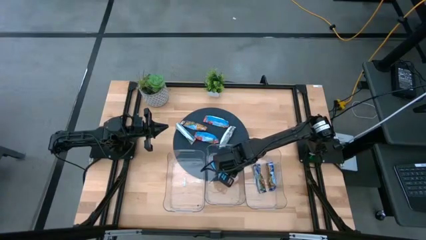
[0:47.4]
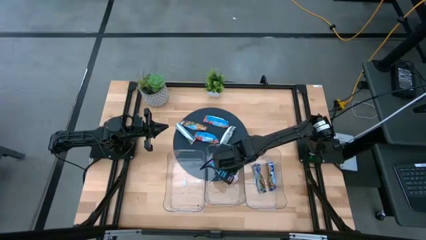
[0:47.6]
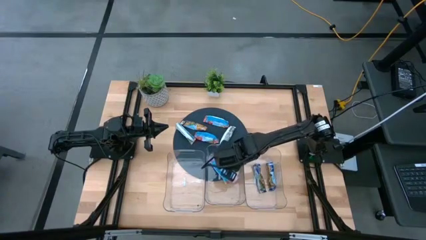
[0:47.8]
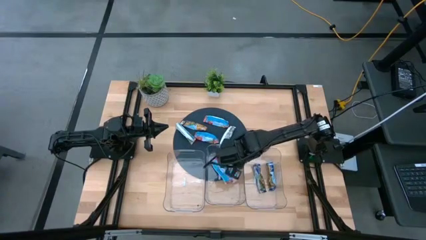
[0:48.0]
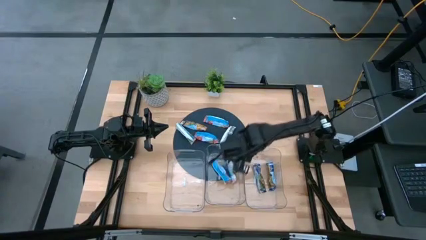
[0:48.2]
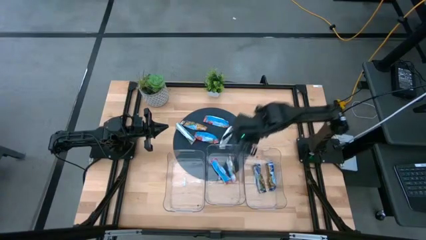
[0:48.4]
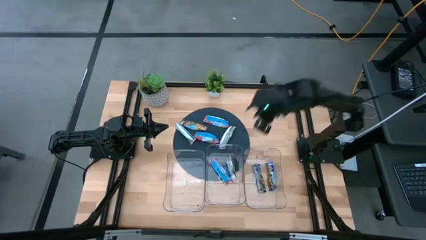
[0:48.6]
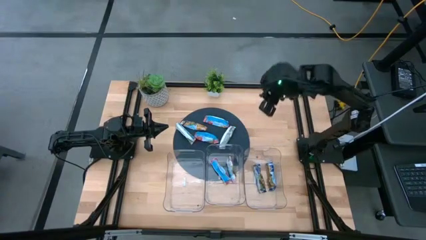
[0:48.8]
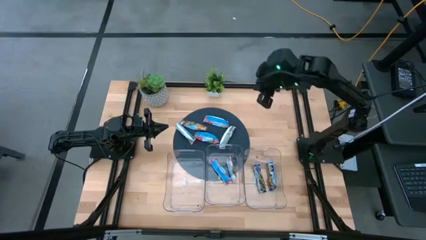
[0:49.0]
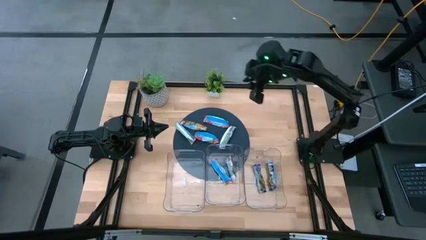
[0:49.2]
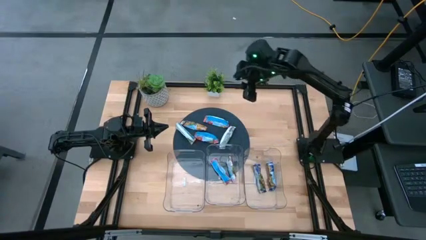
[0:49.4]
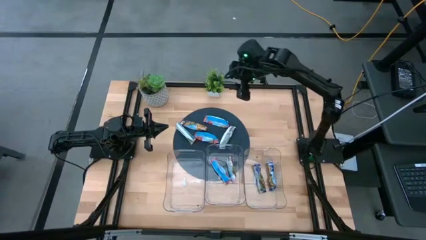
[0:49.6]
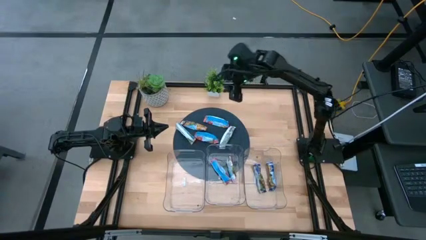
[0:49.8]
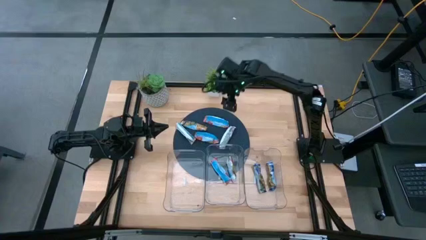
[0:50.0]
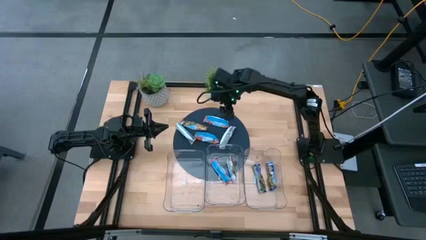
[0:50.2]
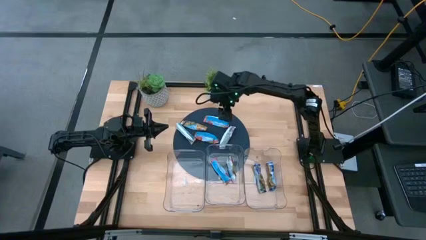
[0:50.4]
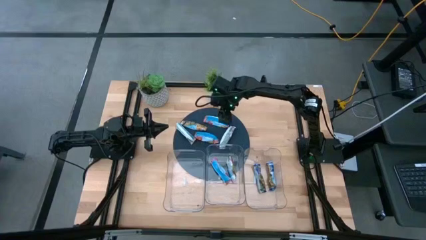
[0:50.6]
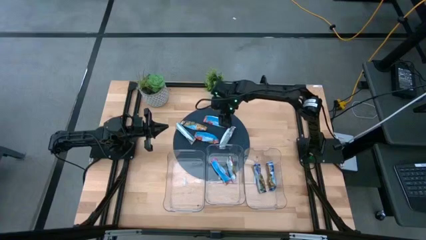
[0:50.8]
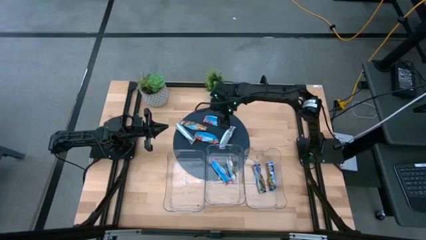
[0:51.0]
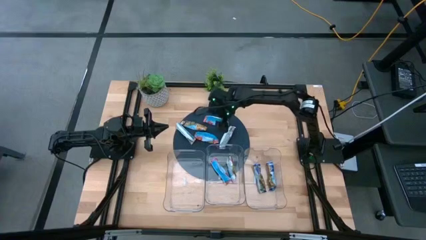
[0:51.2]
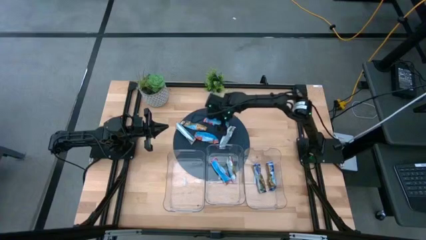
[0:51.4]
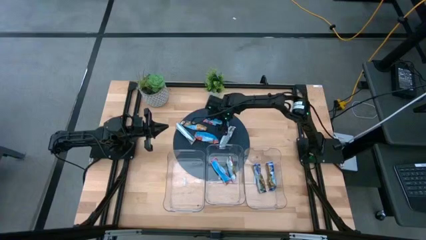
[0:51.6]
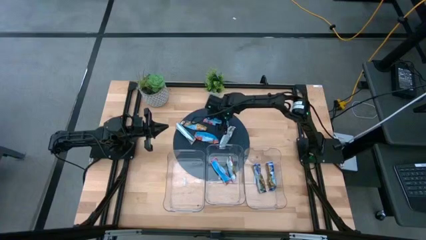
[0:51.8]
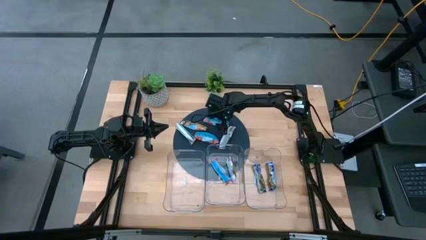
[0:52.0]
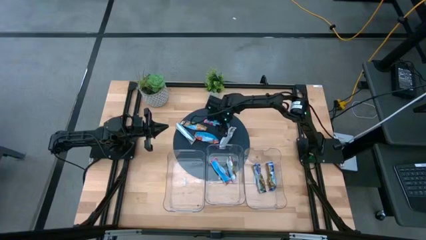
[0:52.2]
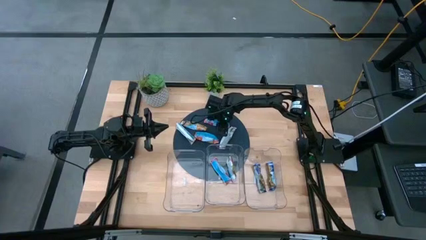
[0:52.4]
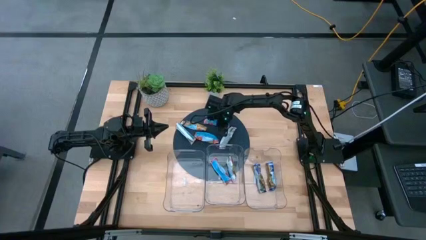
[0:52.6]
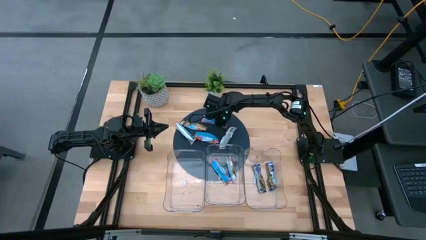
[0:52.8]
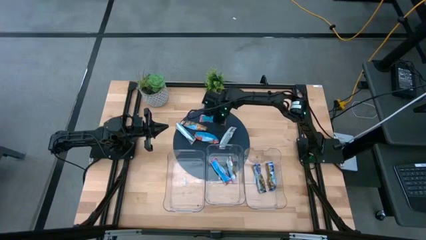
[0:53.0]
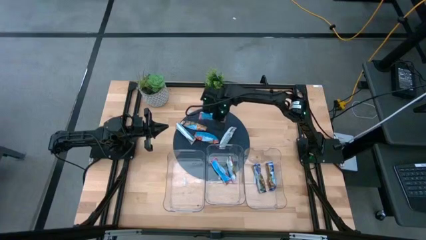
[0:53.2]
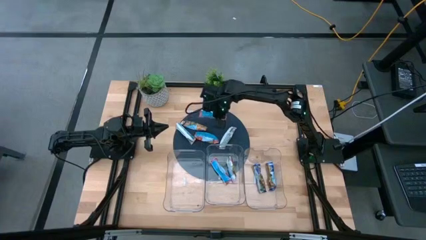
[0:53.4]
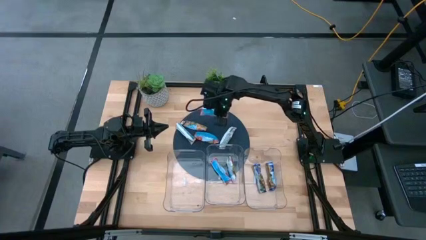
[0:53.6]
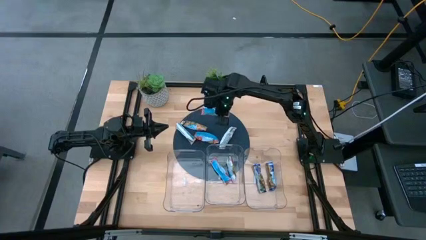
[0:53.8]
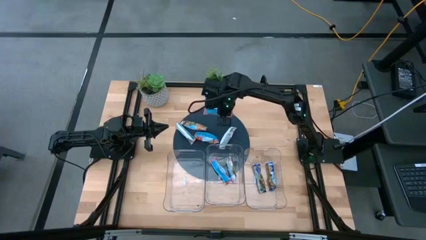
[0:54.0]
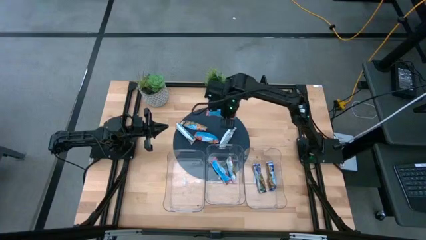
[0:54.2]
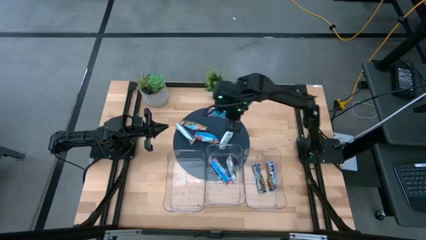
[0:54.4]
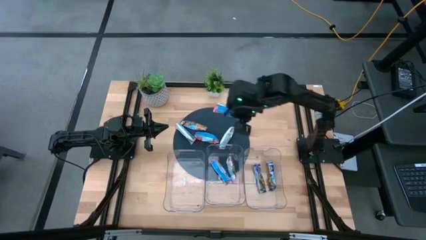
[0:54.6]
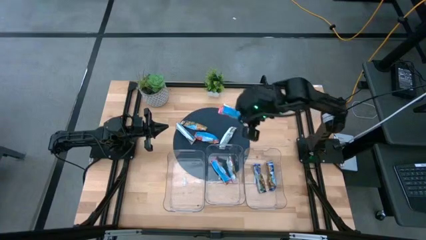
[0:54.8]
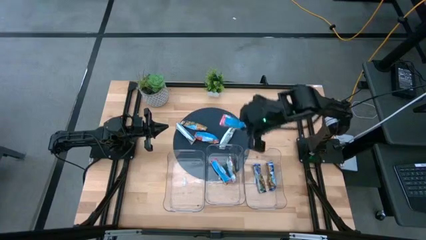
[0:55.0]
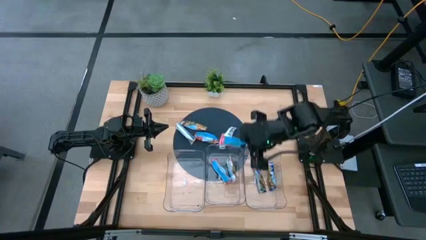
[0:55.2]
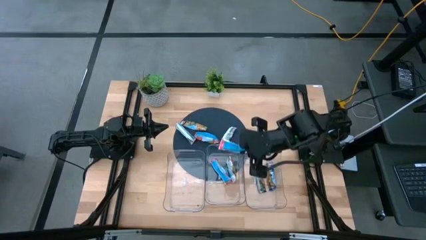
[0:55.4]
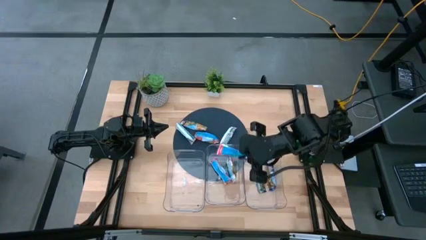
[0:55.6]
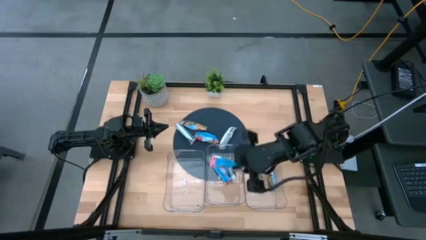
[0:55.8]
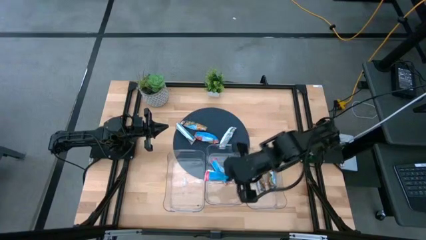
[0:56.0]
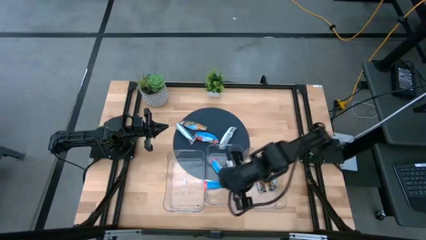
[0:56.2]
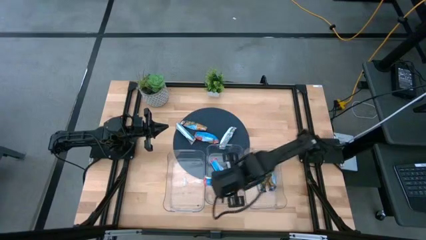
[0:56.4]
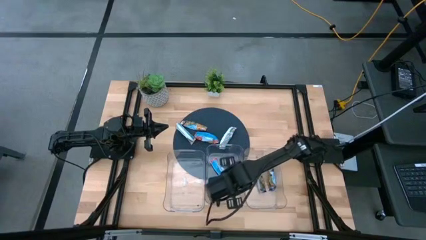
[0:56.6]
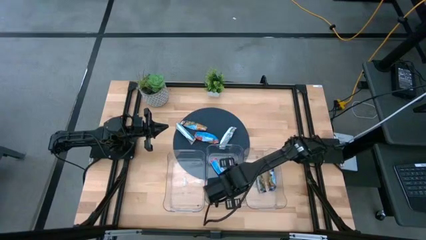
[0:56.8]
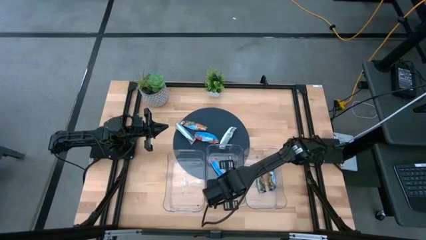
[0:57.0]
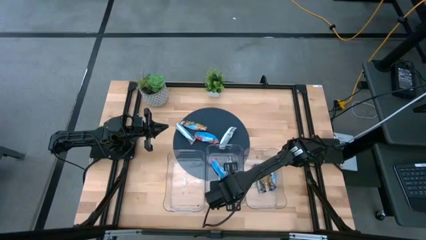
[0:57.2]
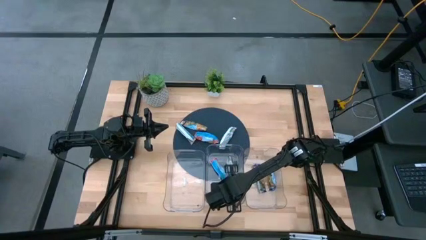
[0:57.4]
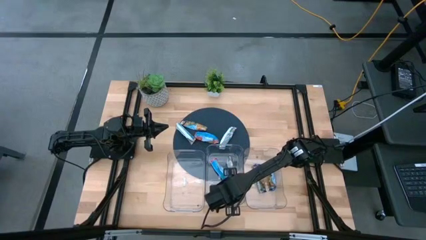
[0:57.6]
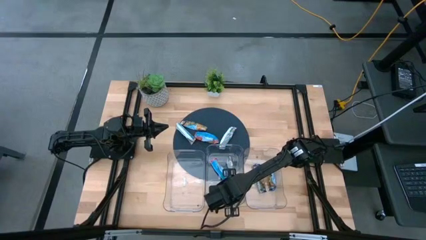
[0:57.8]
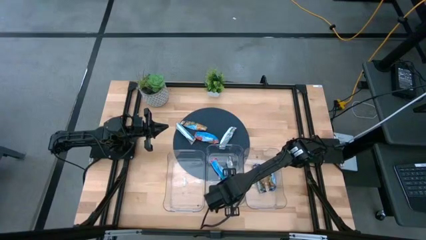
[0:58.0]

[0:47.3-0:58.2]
Task: Pick and place Granola Bars by type
Put the red granola bar into the middle transparent bin

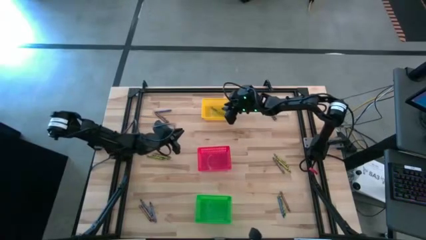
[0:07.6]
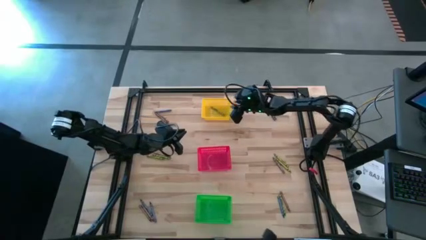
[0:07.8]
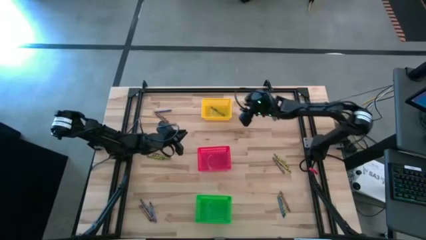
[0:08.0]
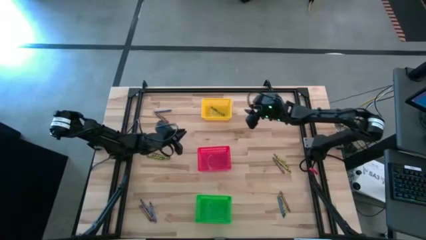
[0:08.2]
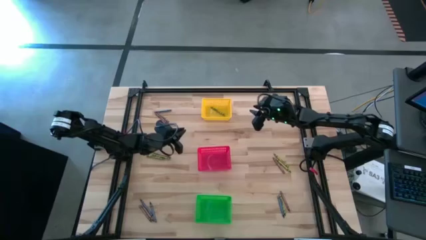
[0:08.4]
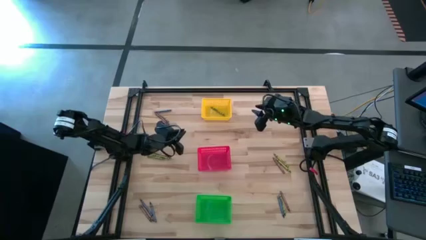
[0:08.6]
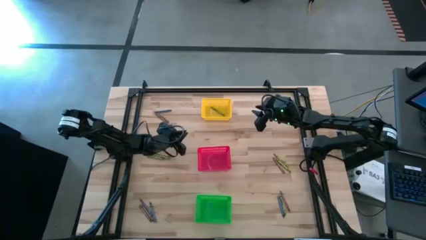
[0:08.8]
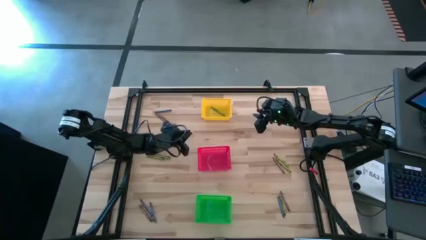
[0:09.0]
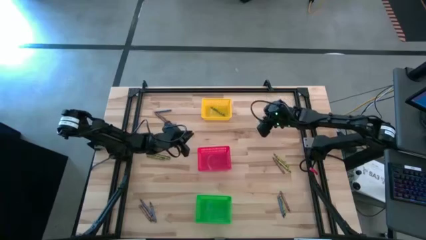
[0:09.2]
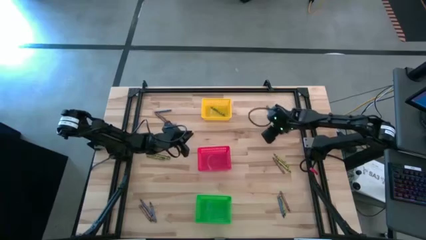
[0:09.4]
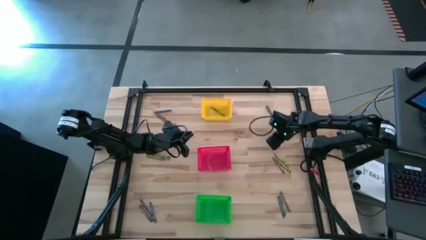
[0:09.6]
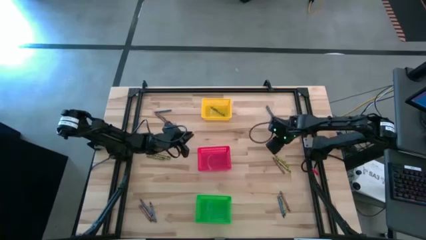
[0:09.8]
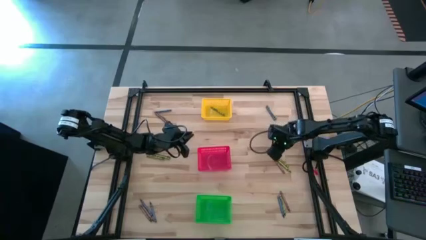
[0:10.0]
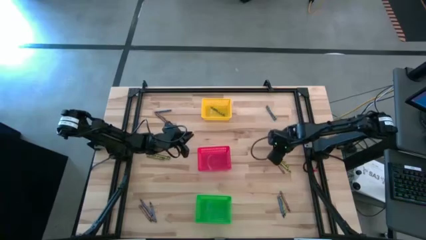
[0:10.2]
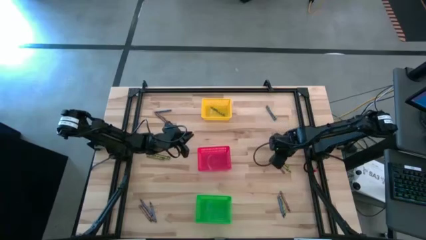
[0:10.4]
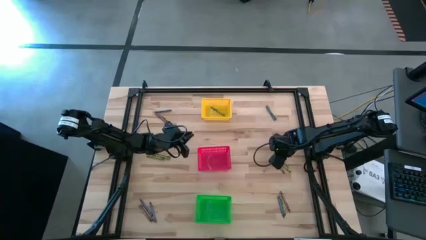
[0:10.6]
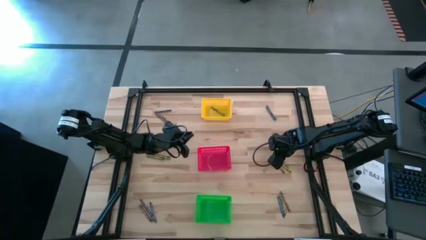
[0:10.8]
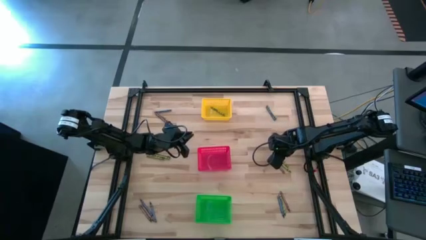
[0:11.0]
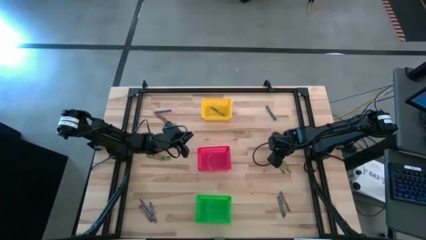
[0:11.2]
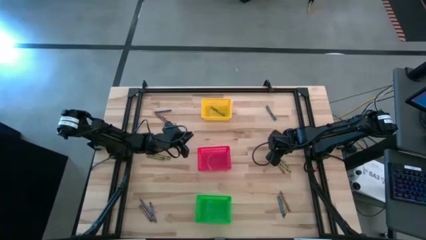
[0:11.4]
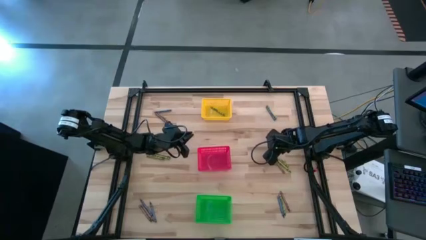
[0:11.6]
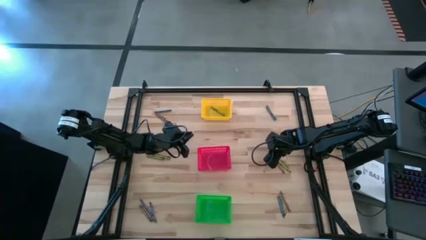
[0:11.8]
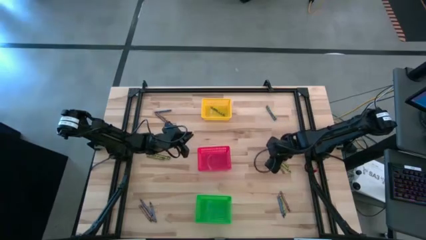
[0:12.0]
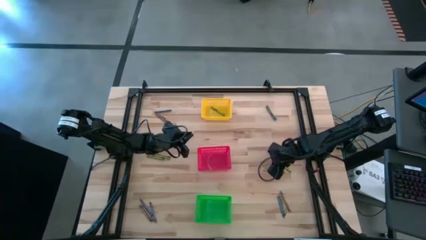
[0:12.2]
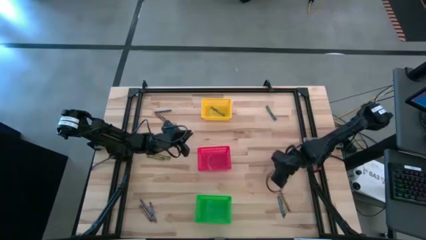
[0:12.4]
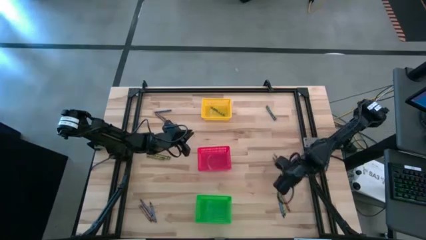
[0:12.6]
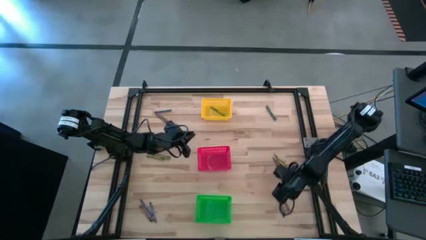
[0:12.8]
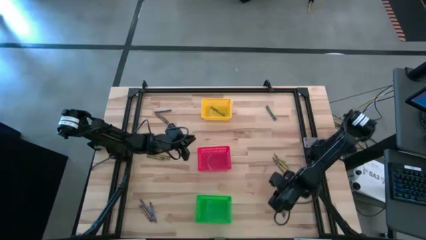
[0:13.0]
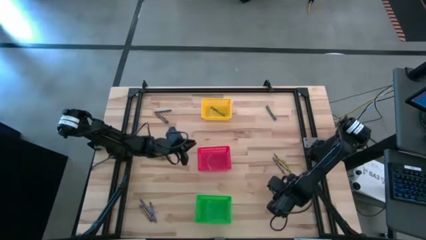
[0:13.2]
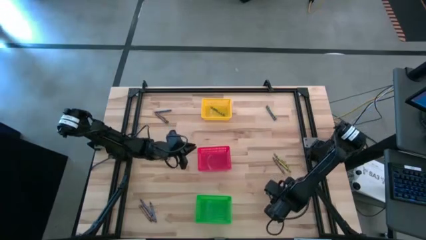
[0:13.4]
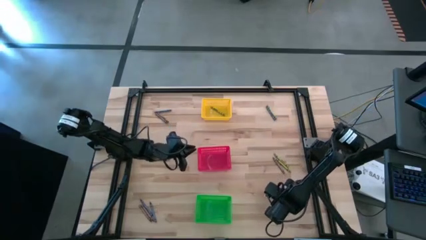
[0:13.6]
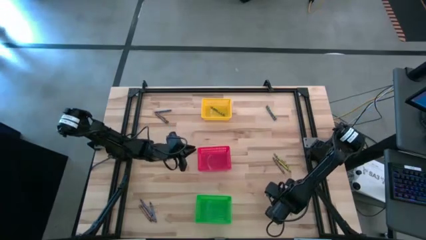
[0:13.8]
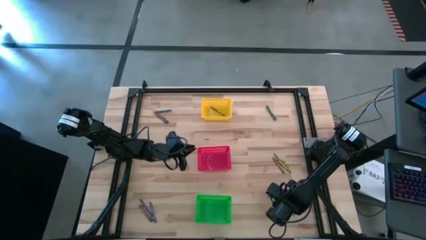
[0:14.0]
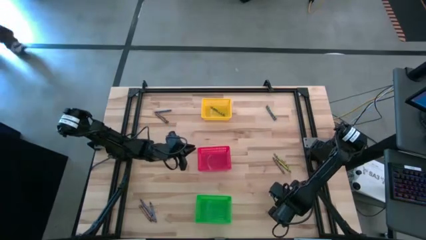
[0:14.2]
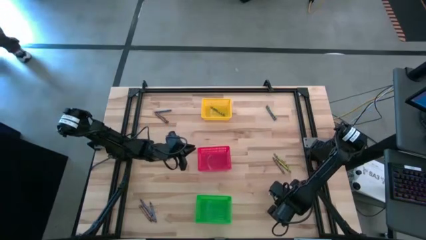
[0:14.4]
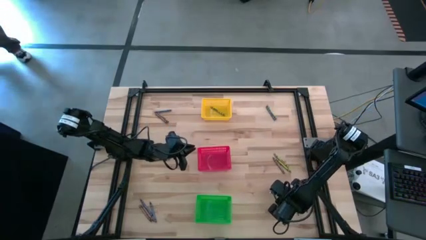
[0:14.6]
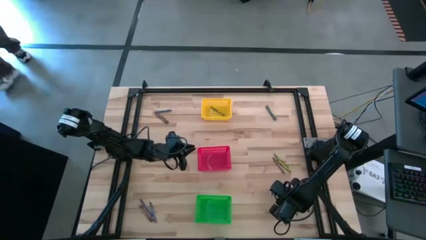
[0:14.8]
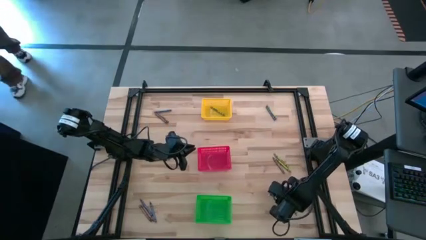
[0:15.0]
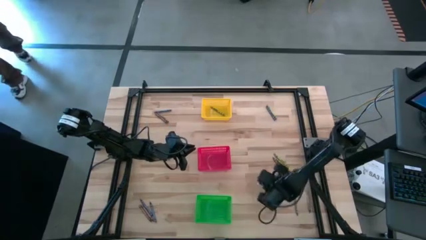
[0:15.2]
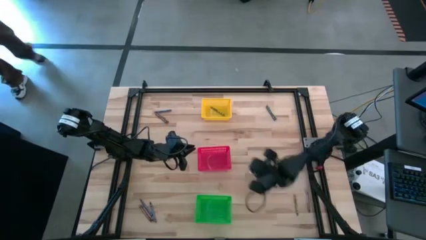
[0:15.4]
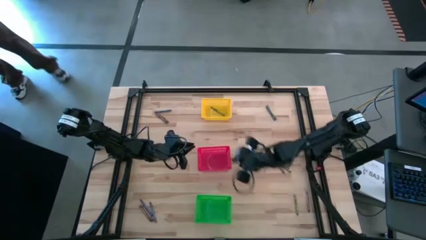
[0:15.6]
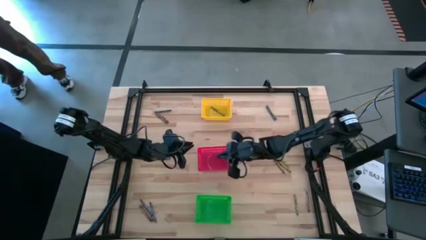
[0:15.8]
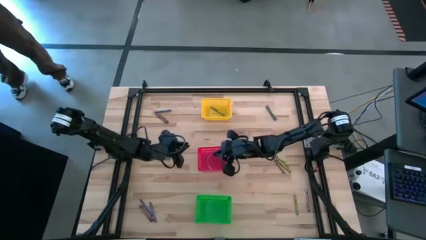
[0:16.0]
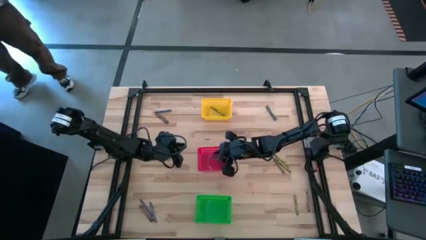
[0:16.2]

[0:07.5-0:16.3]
Task: Sort crayons
Put the blue crayon into the red bin
